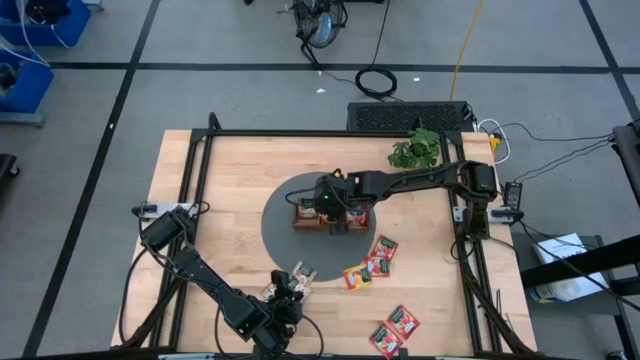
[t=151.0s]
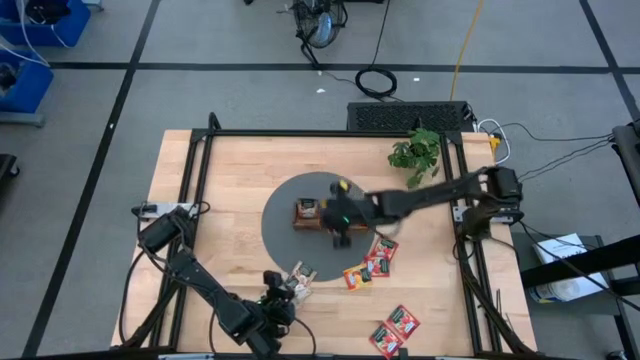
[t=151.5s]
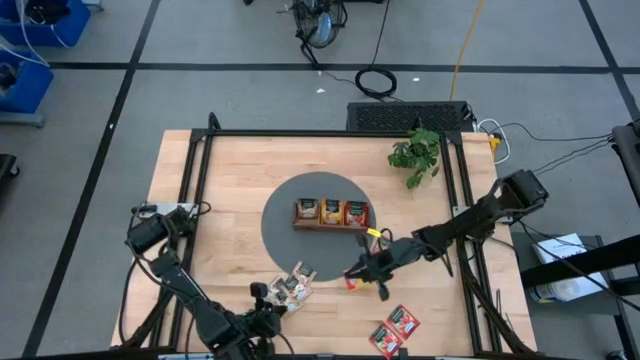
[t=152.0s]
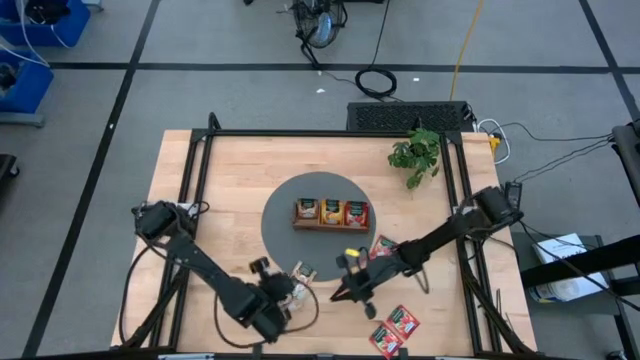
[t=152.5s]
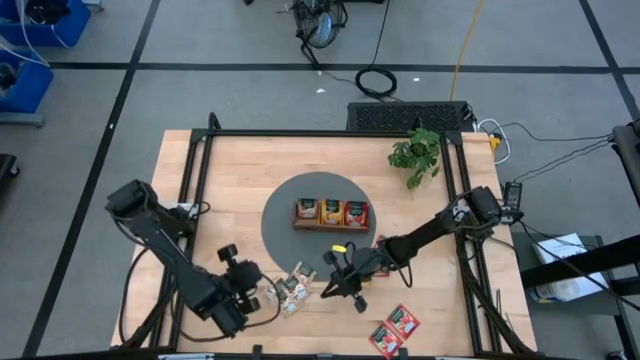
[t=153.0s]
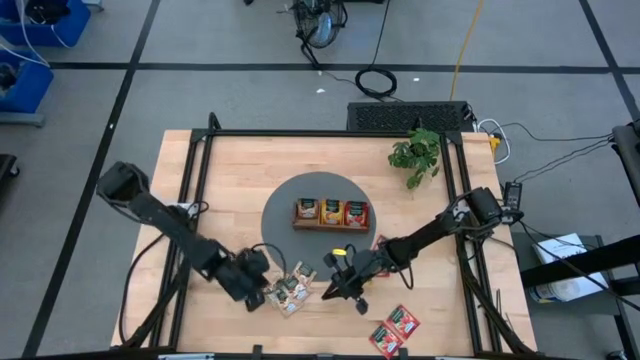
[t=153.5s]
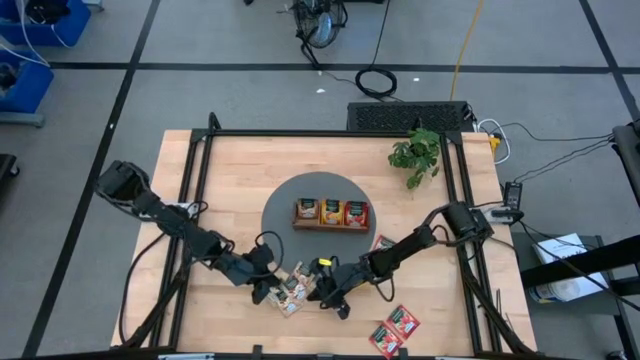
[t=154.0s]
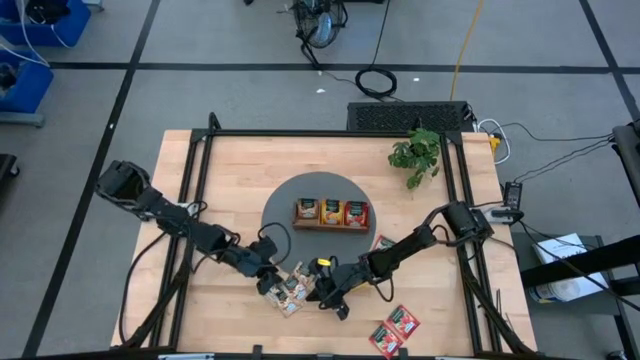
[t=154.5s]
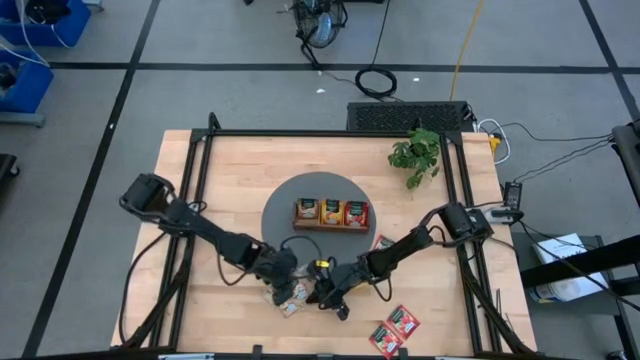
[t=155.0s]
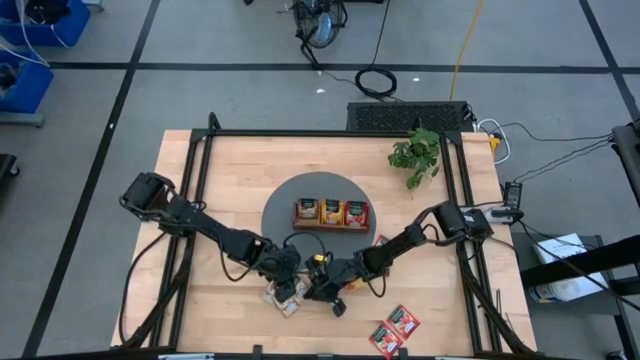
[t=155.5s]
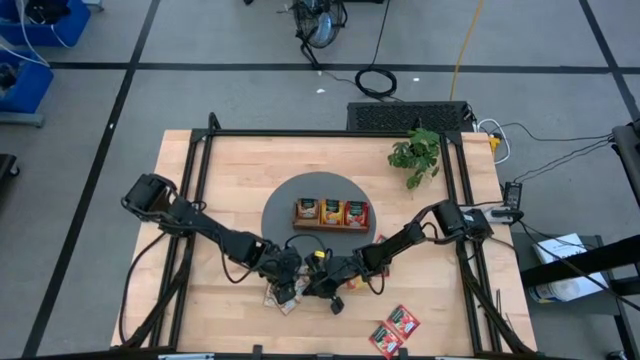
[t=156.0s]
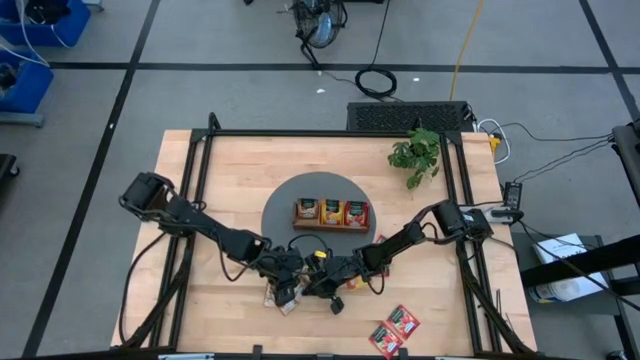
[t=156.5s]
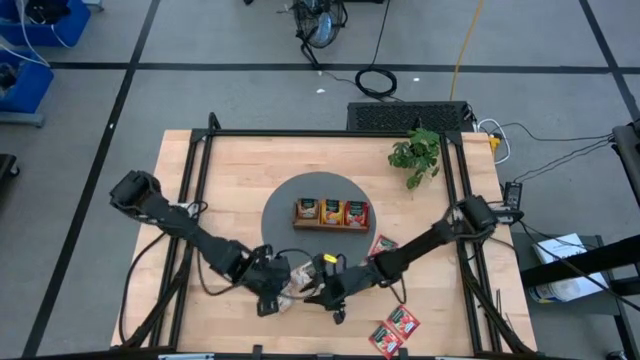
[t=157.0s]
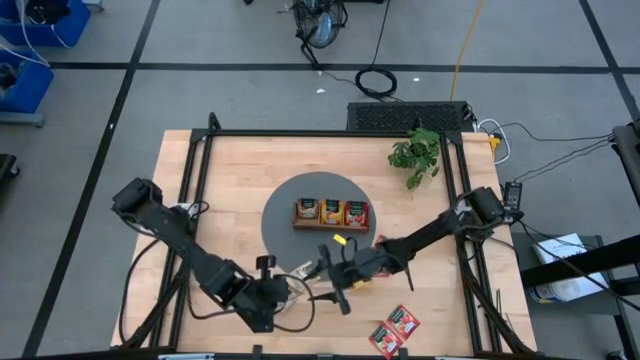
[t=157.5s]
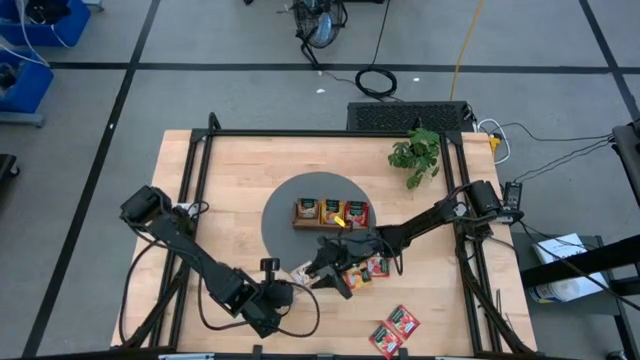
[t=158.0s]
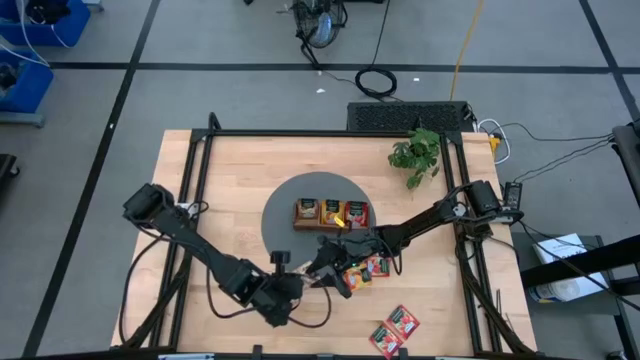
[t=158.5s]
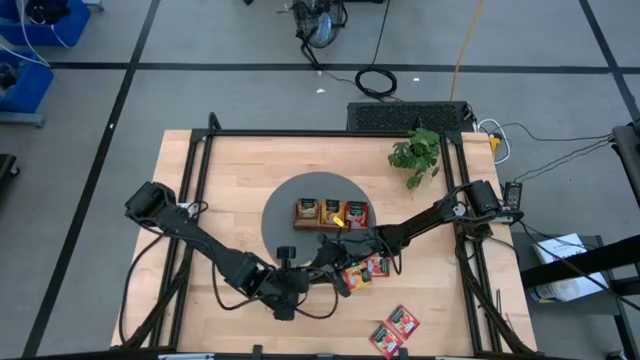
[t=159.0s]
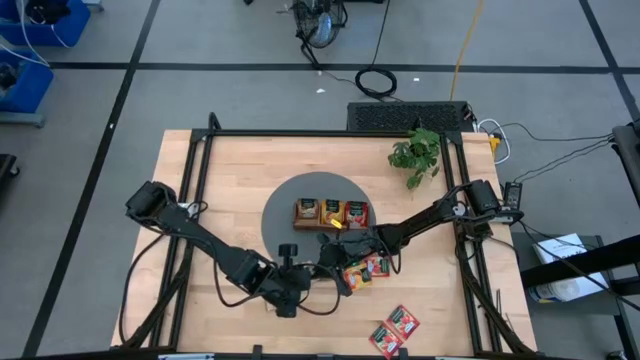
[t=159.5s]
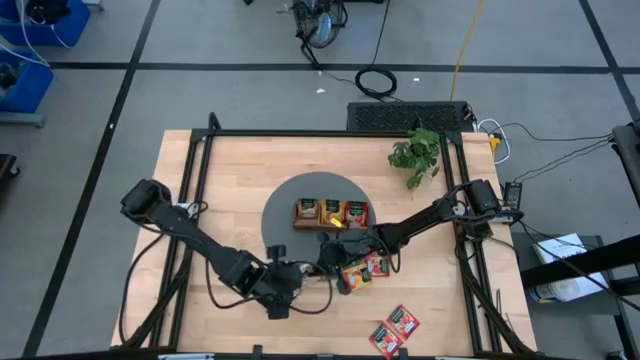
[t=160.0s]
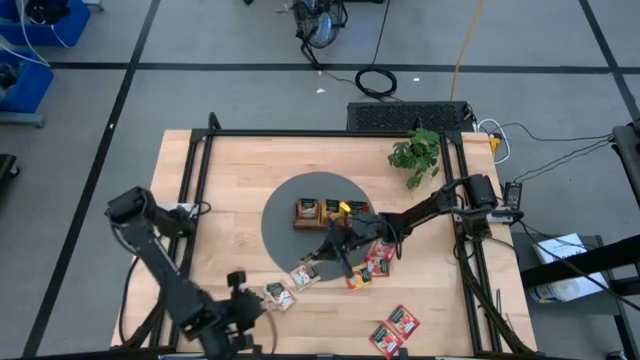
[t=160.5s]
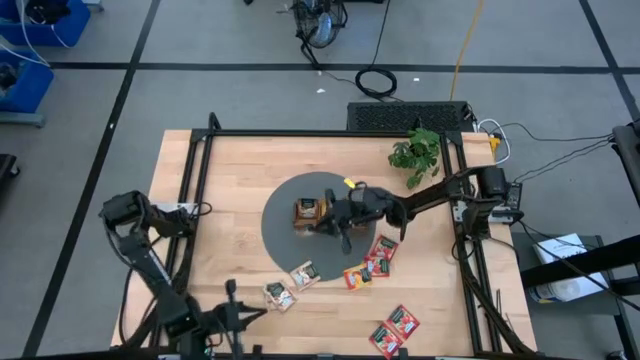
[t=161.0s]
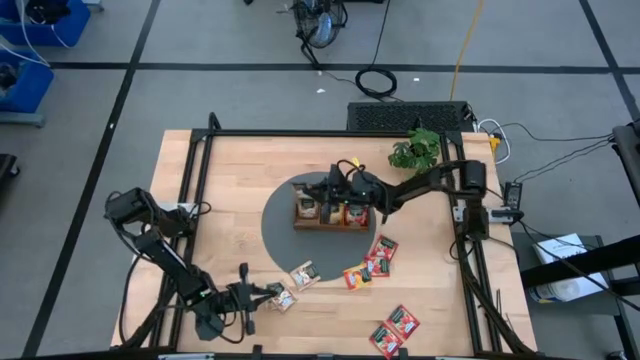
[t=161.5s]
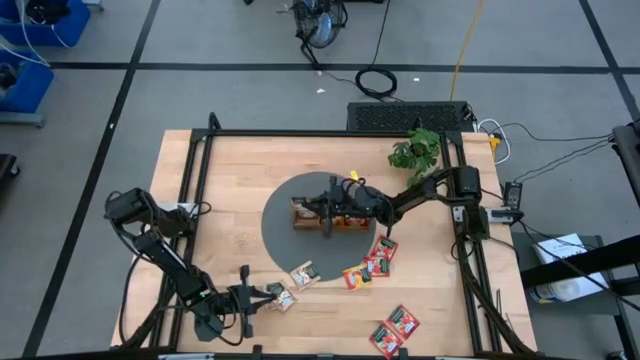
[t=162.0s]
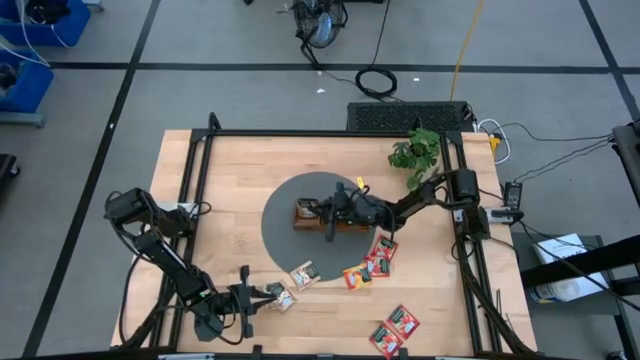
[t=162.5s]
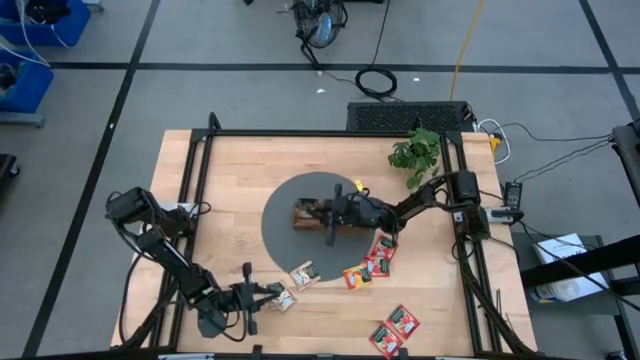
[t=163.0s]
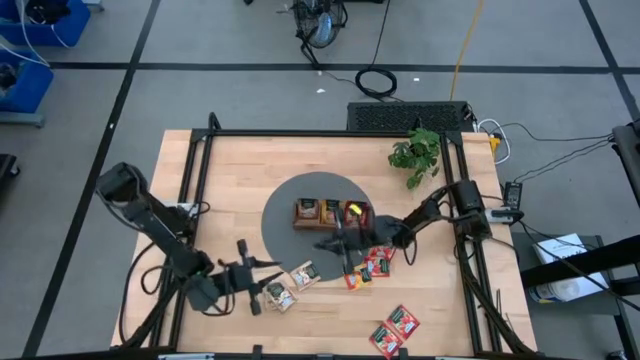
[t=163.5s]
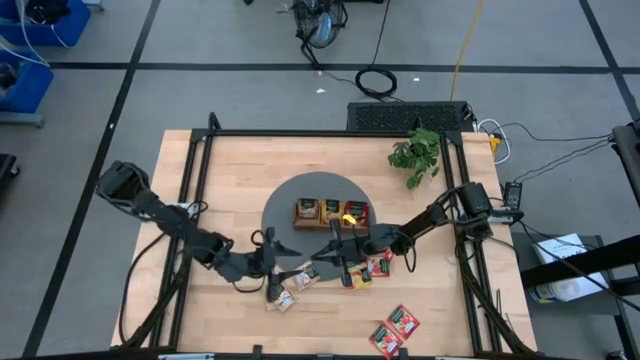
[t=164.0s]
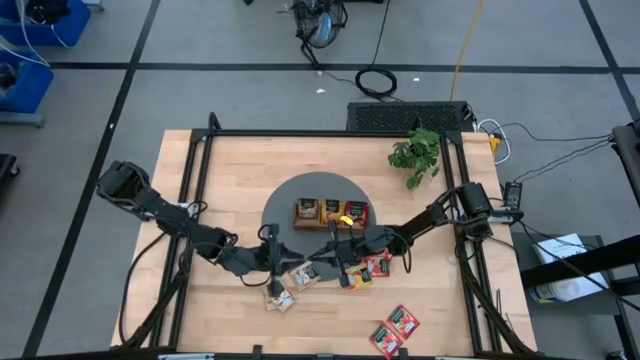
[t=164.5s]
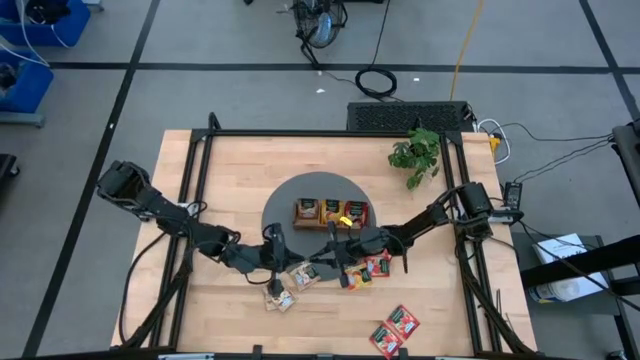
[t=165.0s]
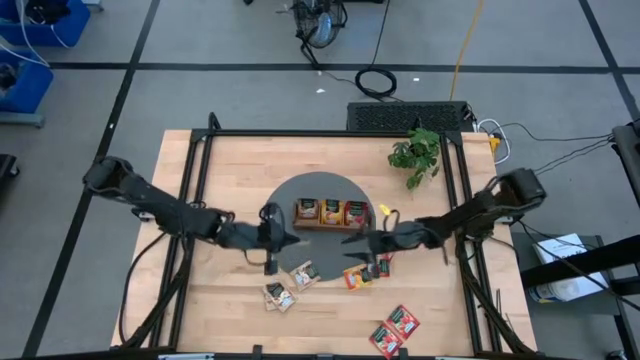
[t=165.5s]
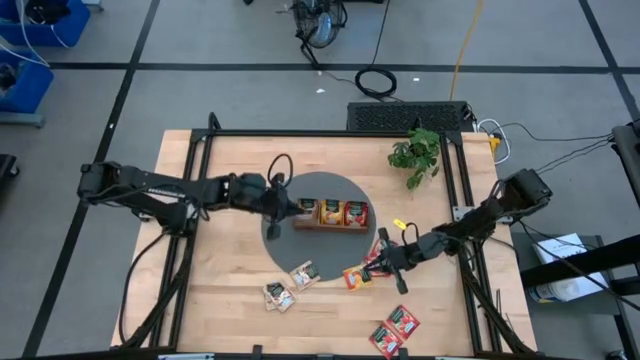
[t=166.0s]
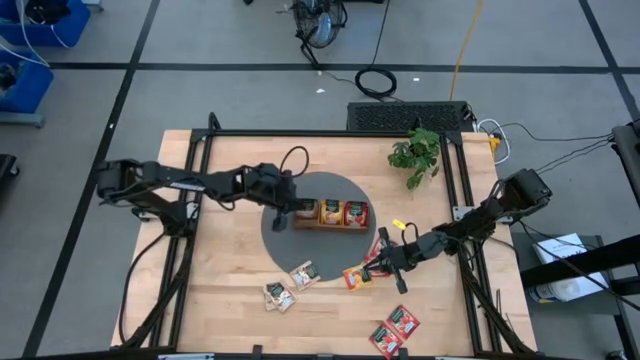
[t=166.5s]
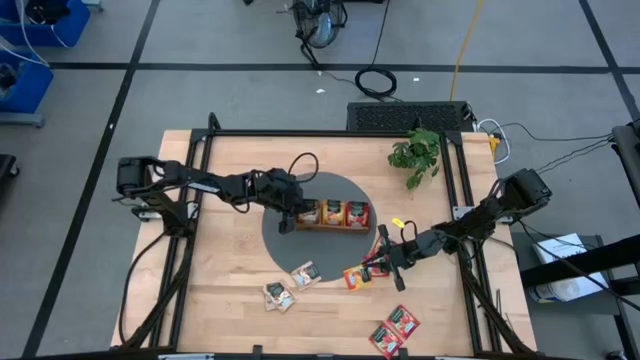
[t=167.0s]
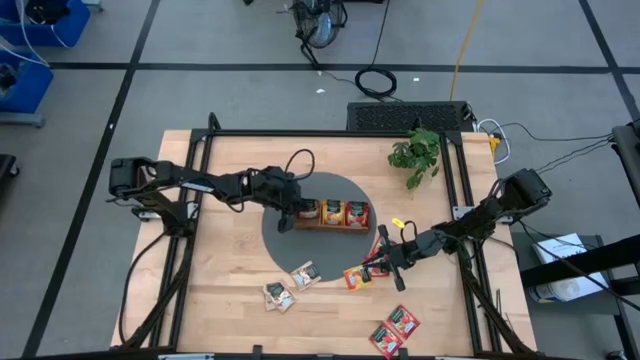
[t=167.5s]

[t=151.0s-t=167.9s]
Task: Pick & Place Tea
Put the light brown tea sachet into the left section of the wooden organizer

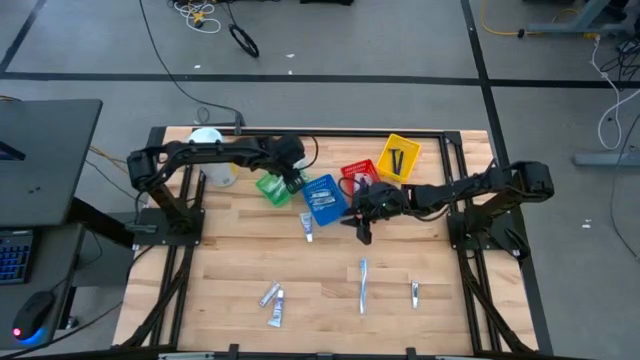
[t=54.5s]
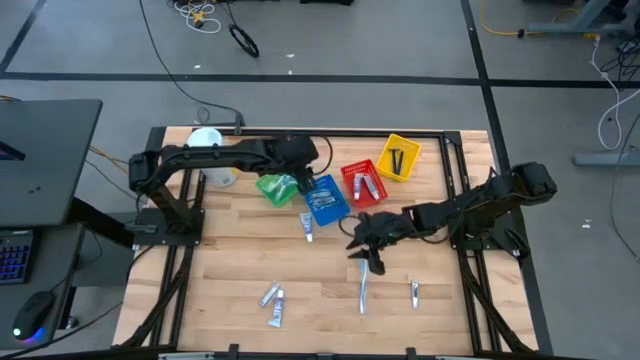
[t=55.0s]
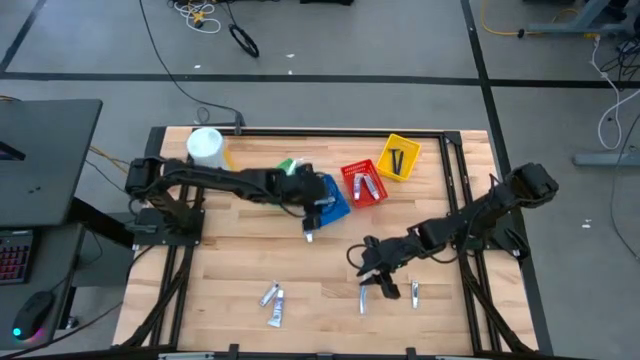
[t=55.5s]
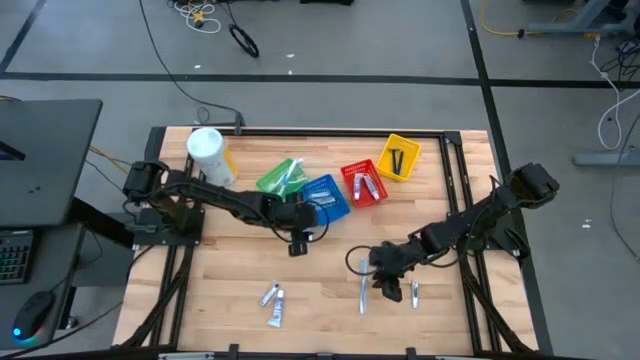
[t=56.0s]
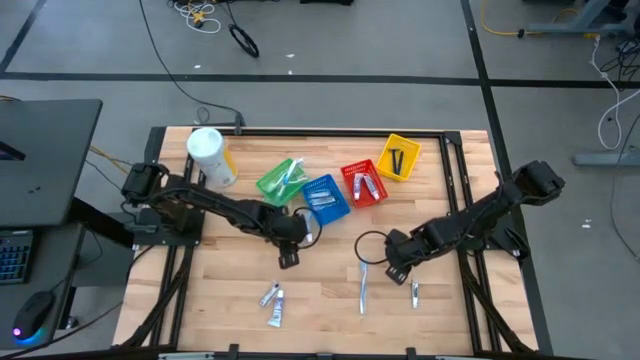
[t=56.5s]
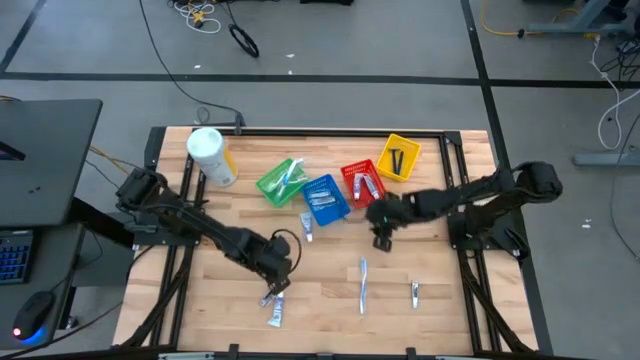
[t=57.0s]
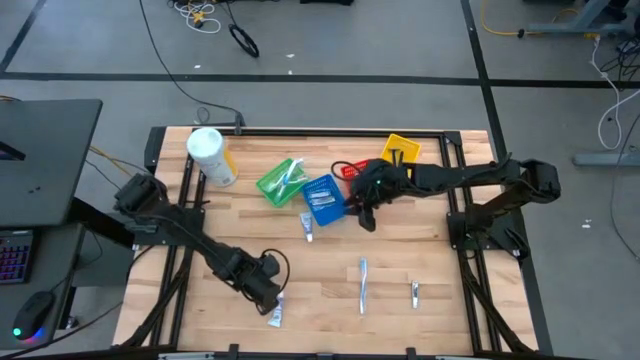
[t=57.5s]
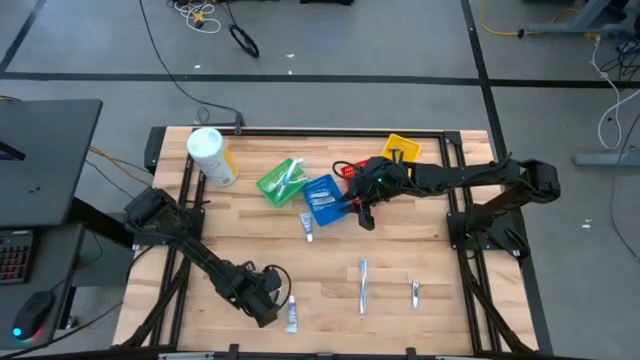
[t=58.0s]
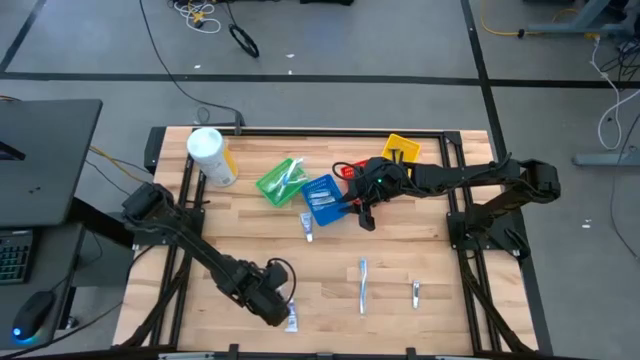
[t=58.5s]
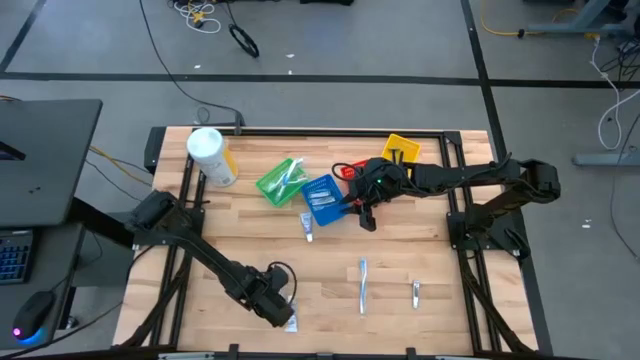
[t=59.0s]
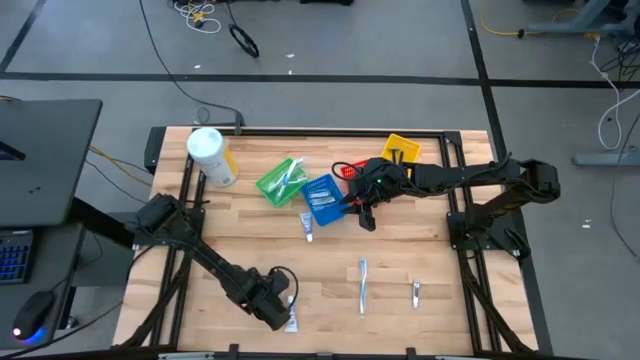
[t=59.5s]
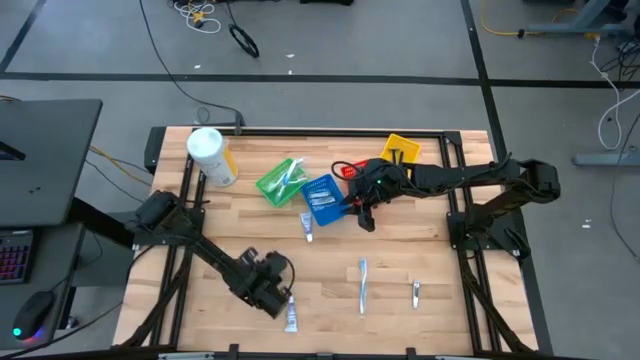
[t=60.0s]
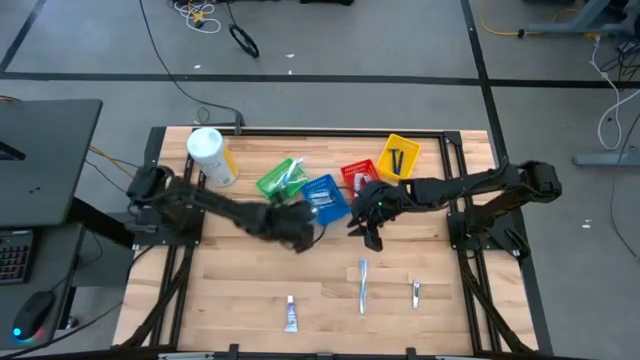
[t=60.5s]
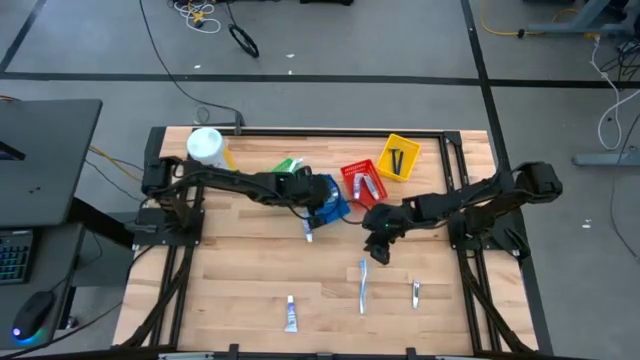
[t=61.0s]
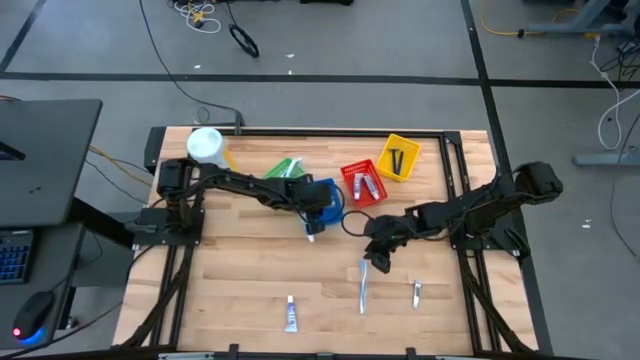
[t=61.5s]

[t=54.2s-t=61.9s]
Task: Pick & Place Travel size toiletries
Put the left nail clipper into the blue bin
